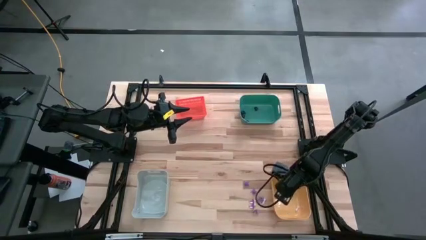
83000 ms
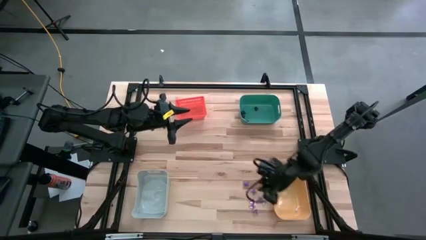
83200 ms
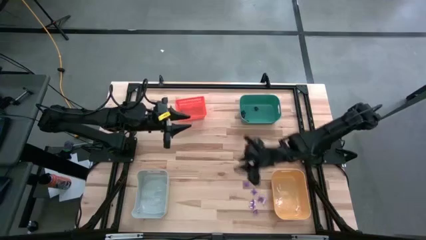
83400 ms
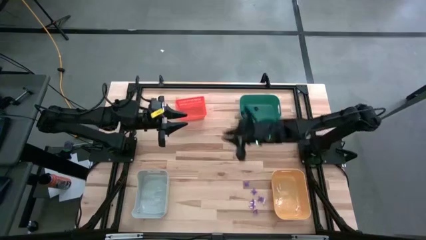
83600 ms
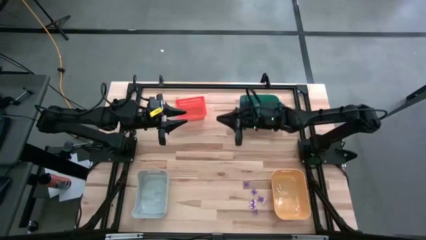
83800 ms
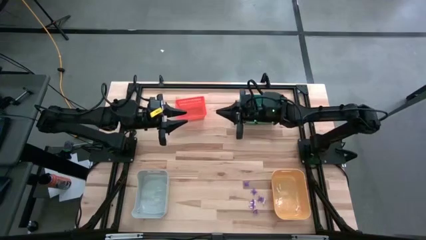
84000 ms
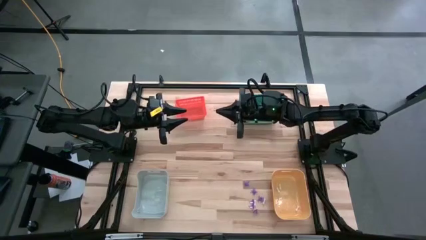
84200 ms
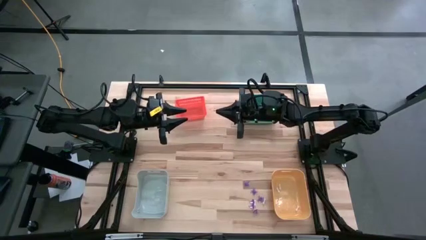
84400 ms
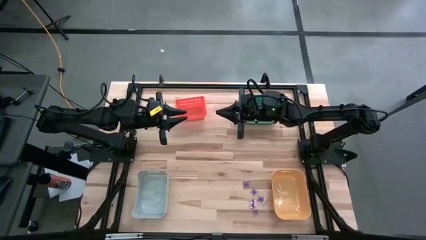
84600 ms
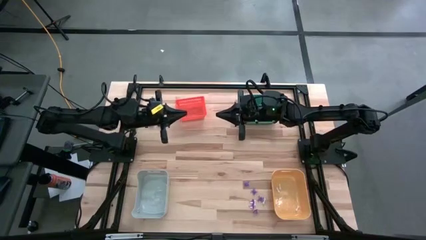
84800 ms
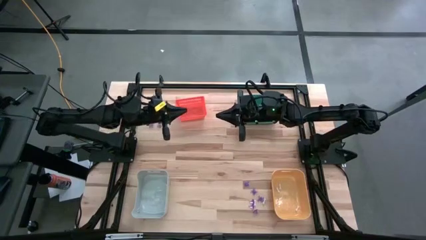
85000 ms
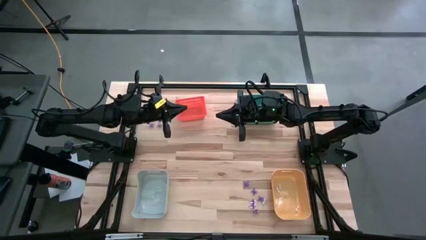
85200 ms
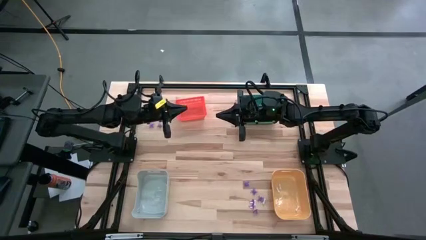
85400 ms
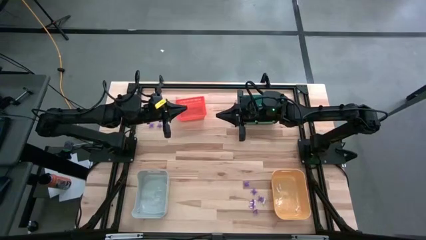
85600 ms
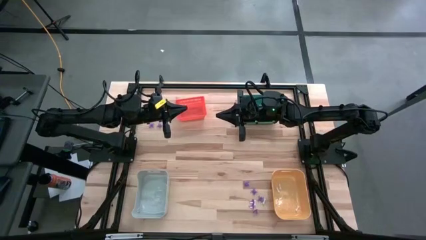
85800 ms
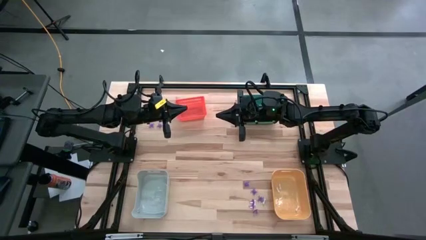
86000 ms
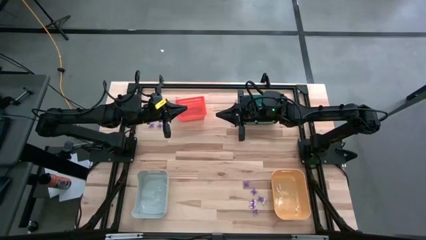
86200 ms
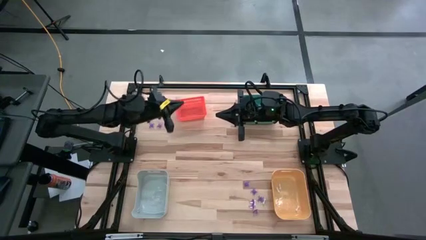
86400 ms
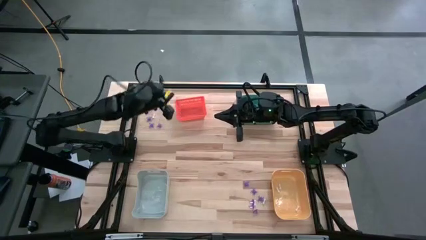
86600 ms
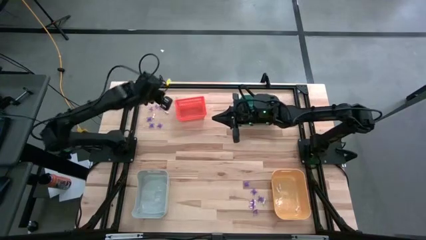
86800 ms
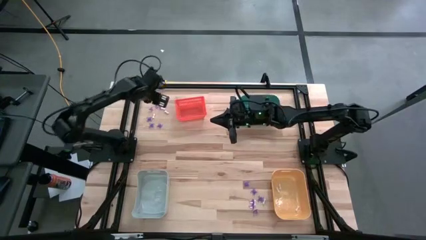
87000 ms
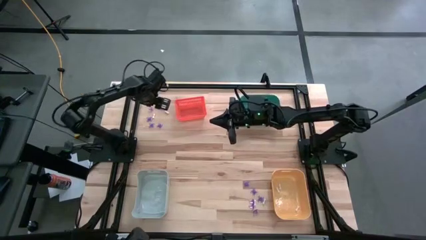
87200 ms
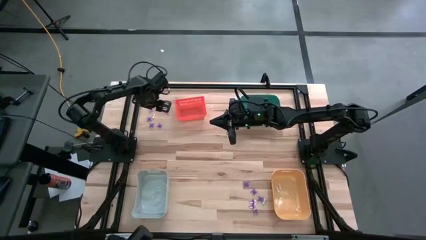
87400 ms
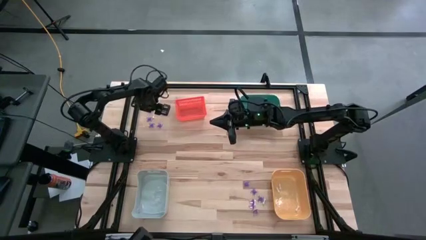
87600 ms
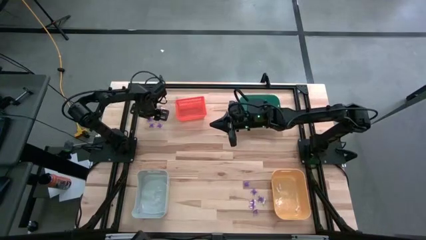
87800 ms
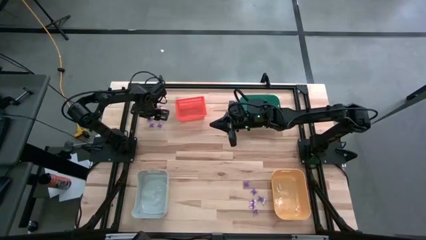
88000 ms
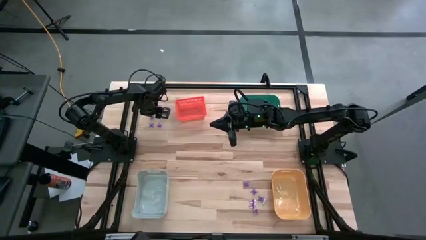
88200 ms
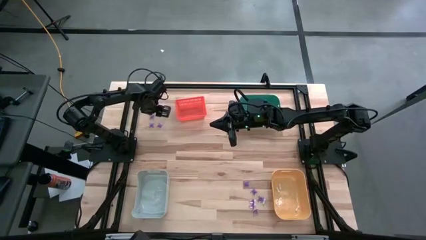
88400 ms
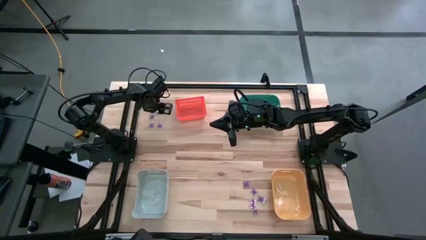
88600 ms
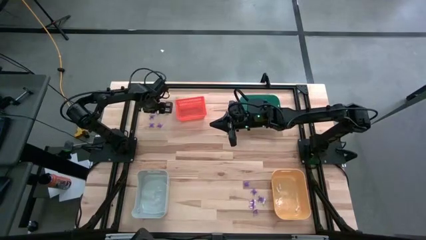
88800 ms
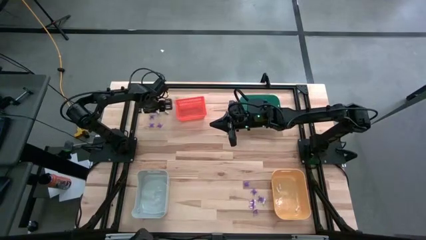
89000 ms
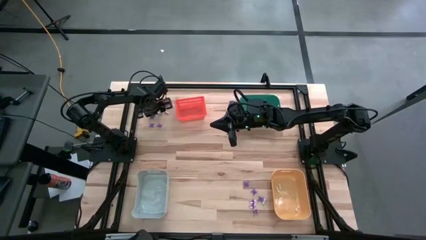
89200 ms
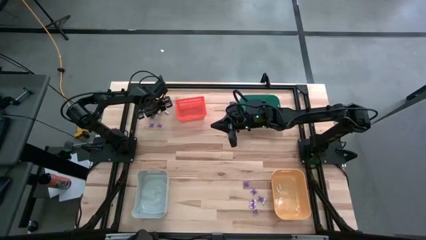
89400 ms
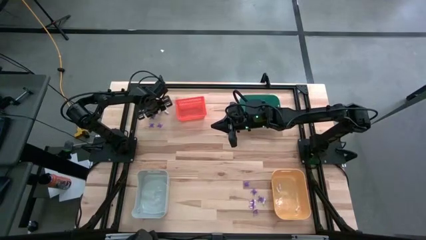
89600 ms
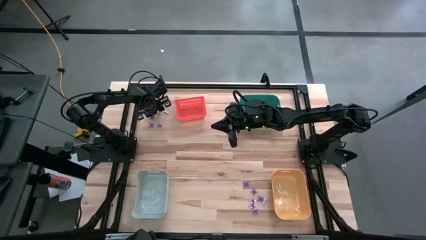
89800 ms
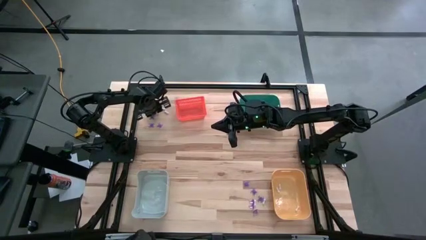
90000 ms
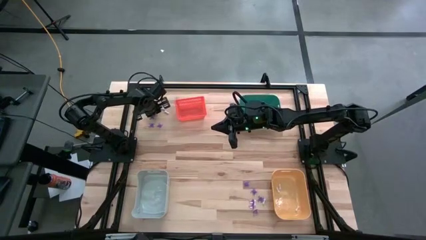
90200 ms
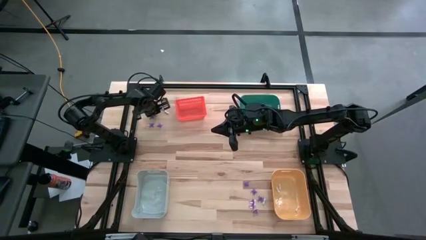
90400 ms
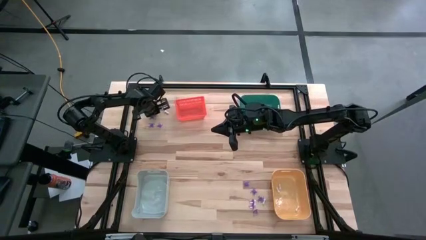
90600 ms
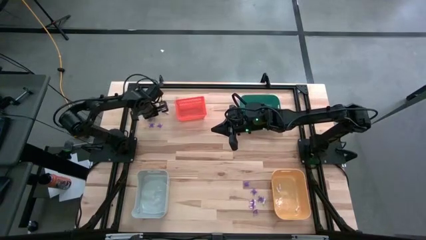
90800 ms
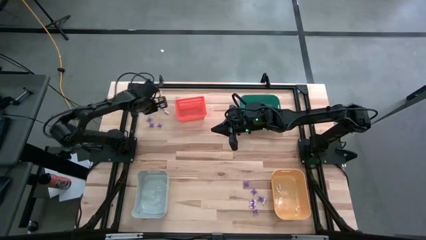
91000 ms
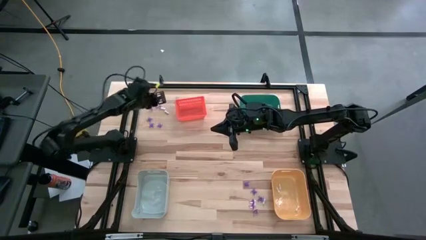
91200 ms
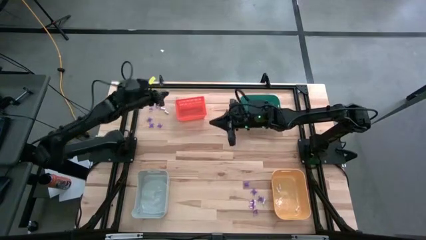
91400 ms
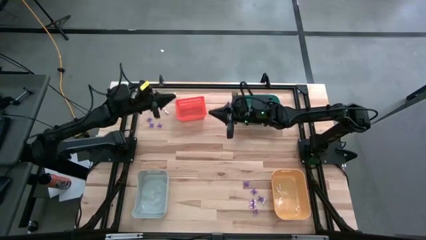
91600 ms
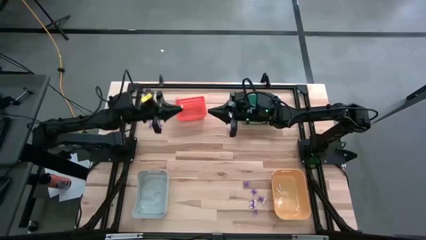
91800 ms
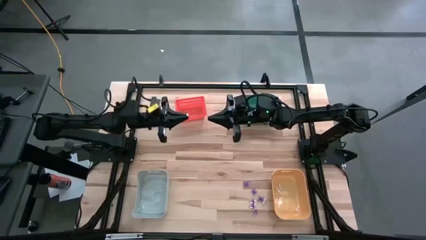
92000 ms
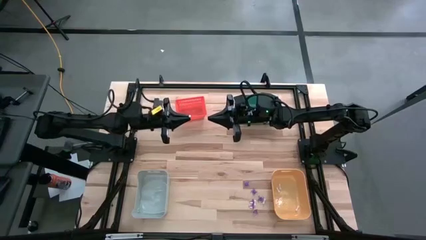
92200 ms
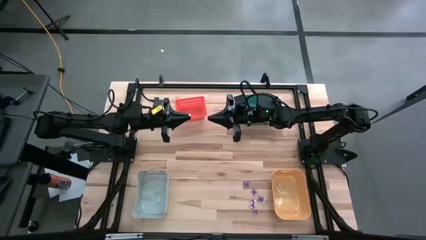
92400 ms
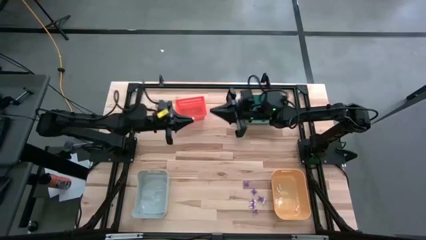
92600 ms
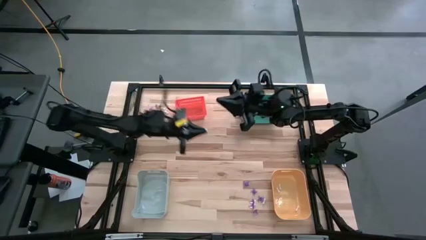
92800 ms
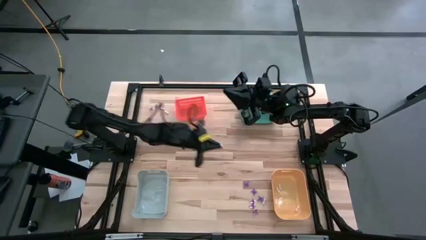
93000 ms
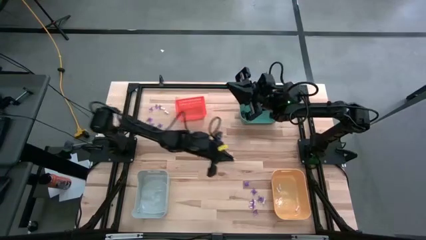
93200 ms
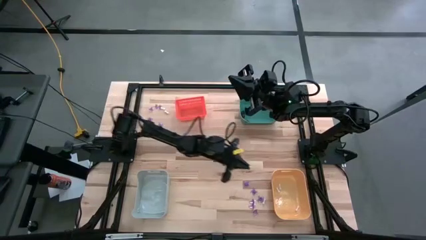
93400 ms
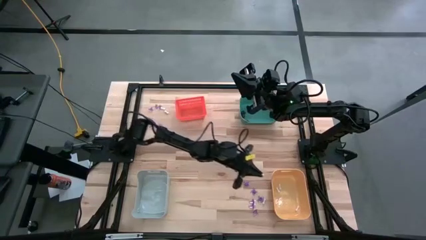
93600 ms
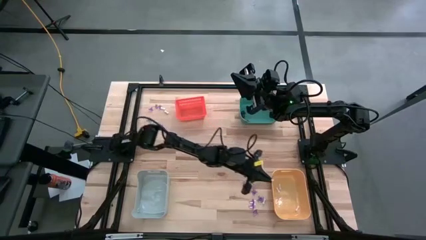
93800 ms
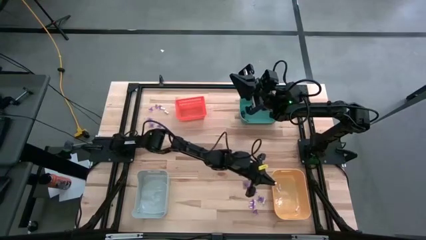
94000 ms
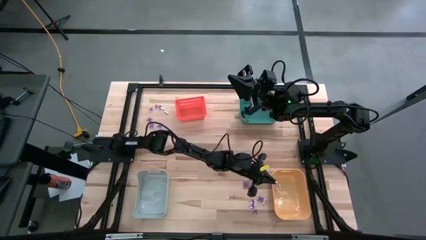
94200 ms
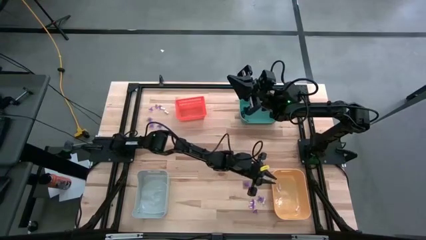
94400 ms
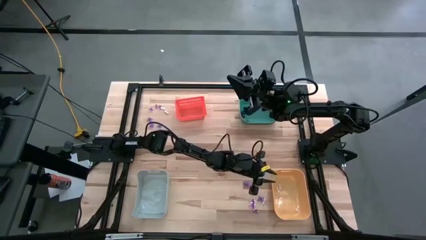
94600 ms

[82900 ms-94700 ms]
Task: Sort Halloween decoration
Put the white bone toy into the yellow bin

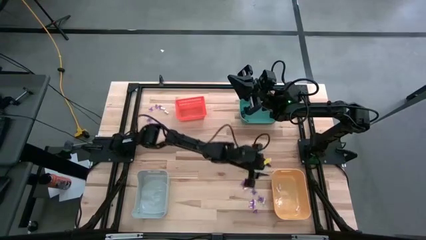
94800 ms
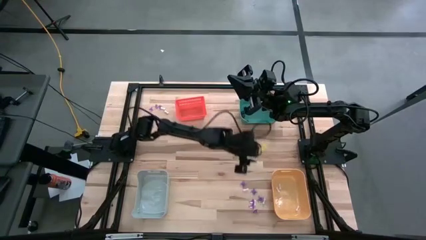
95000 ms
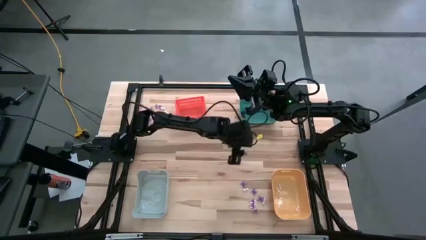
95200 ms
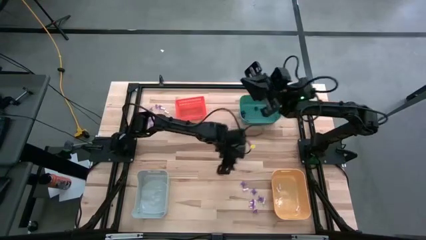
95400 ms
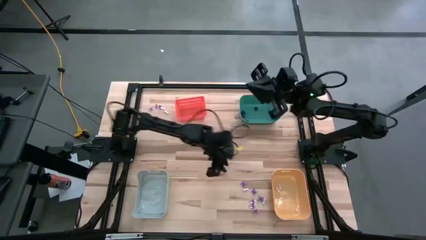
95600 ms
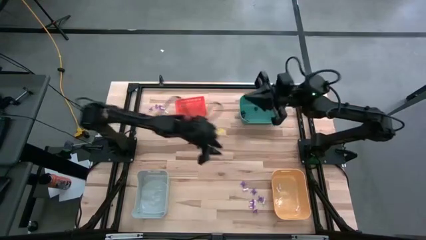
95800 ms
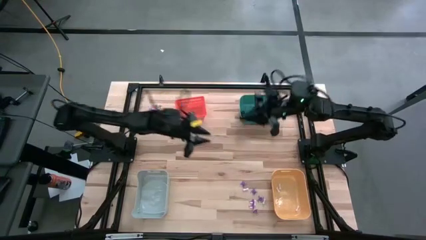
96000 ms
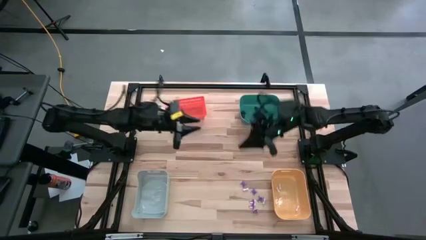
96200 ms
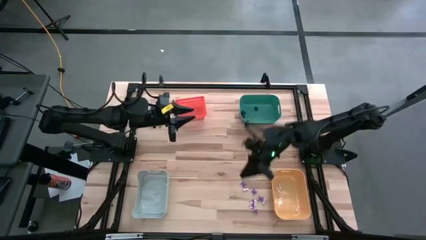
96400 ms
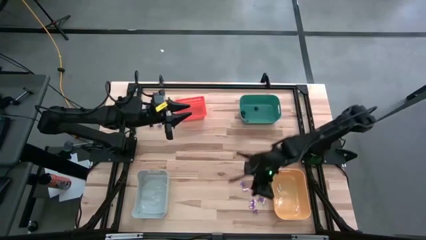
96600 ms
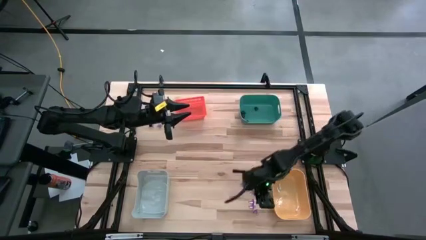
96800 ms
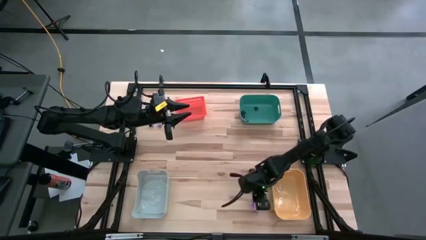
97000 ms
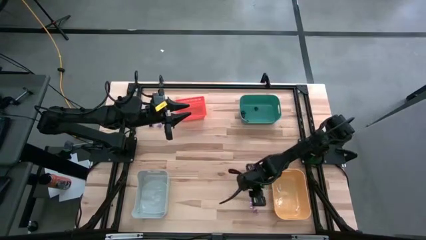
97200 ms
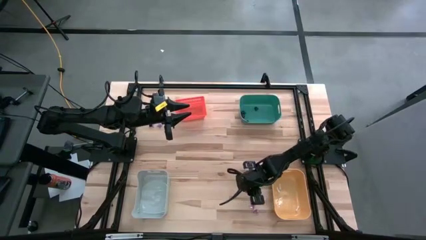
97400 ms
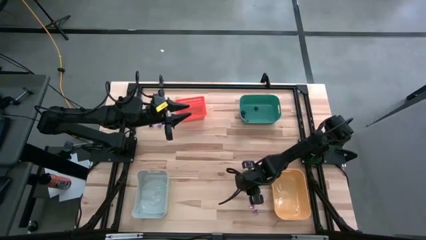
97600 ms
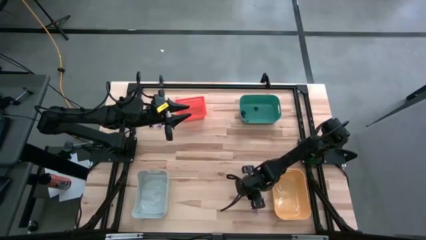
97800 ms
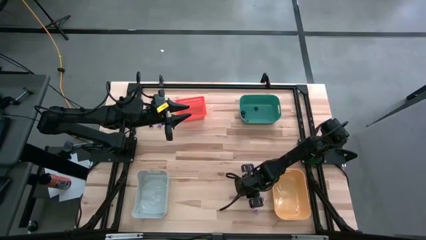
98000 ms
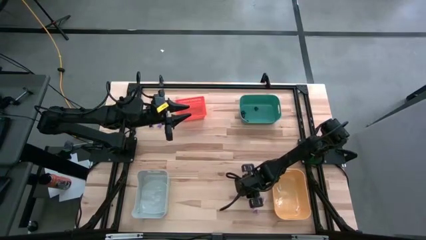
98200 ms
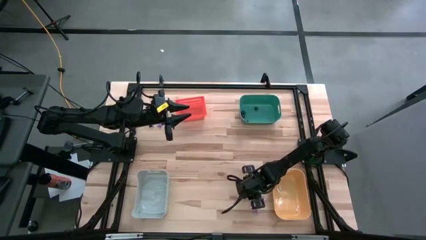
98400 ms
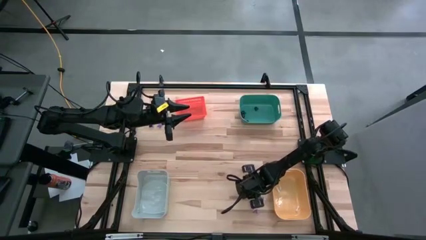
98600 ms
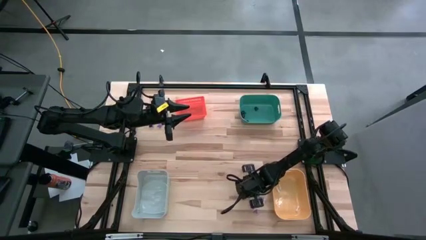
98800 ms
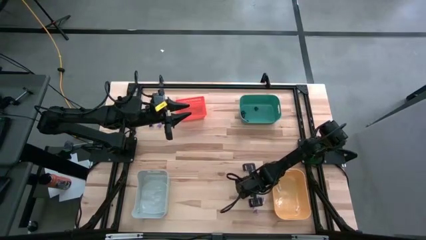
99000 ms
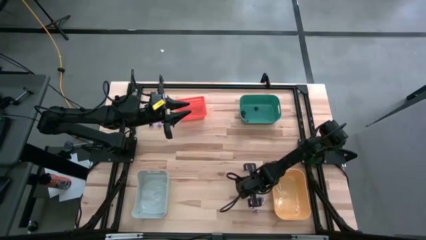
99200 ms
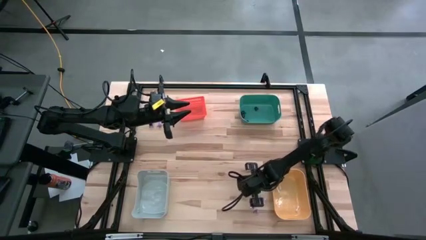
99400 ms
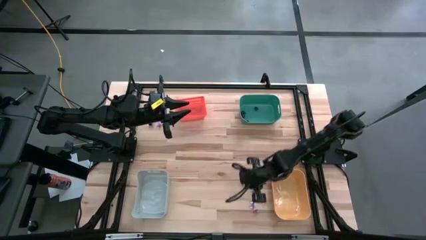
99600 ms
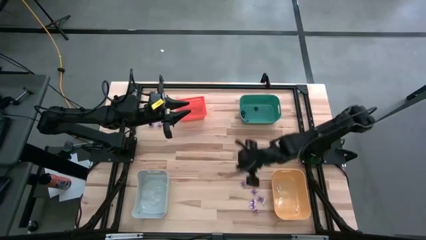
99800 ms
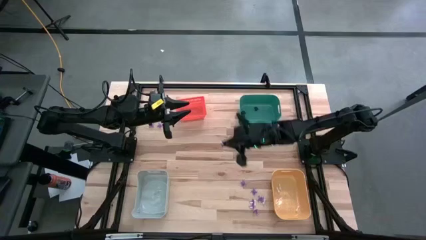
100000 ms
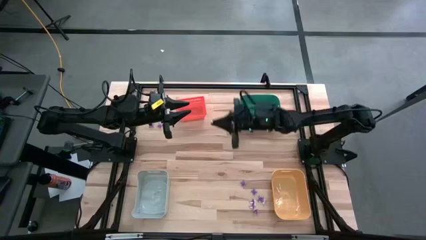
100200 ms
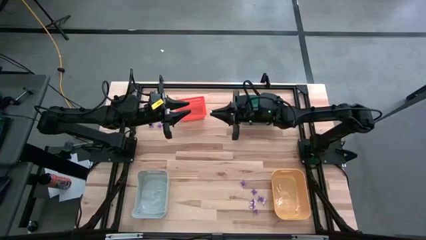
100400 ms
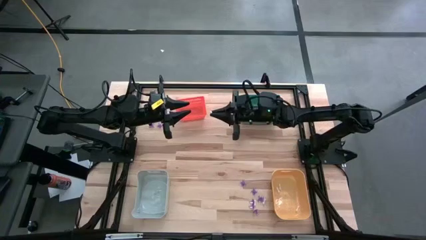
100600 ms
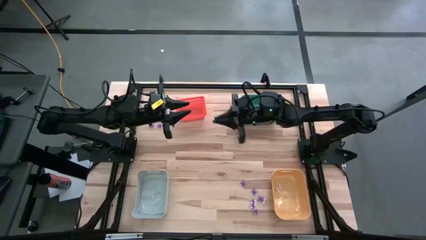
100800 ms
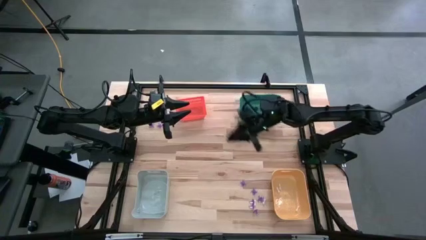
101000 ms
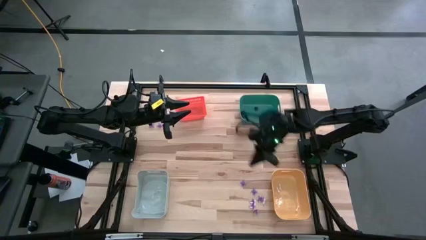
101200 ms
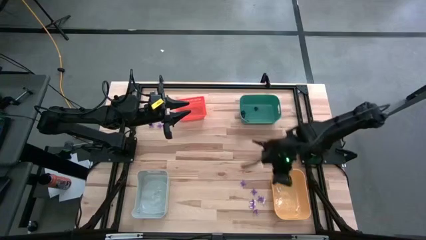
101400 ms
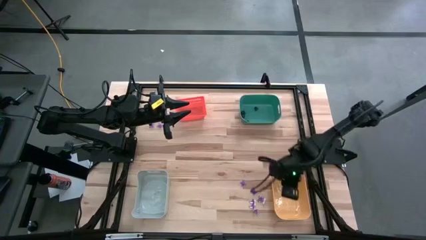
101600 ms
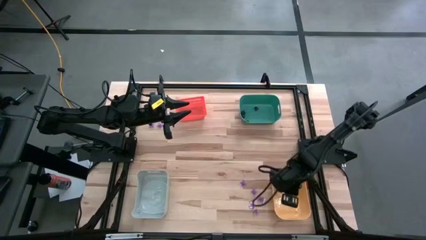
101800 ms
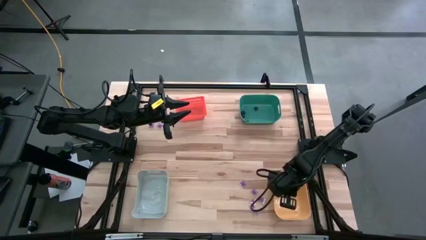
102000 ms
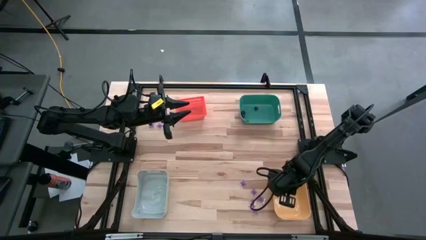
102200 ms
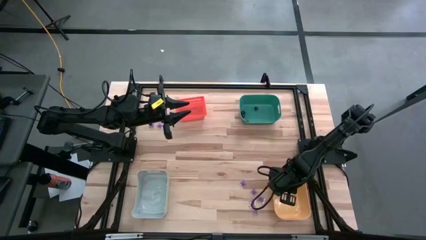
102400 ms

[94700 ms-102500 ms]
Put the white bone toy into the yellow bin
